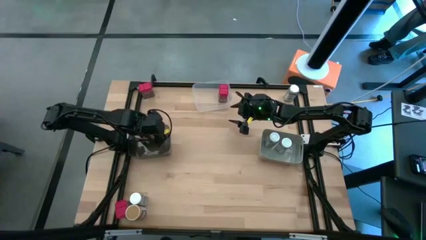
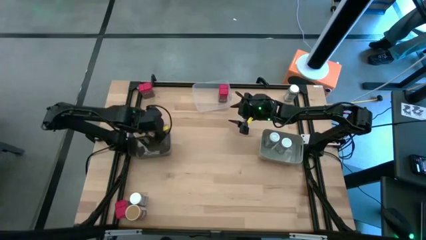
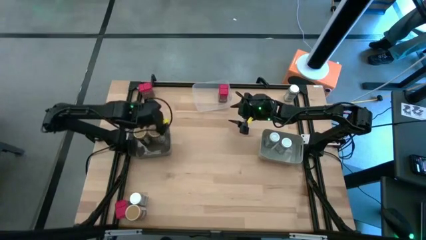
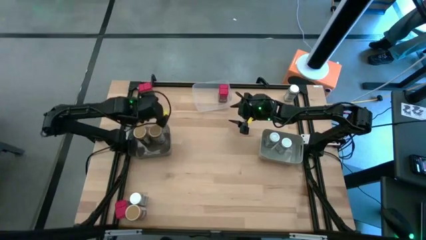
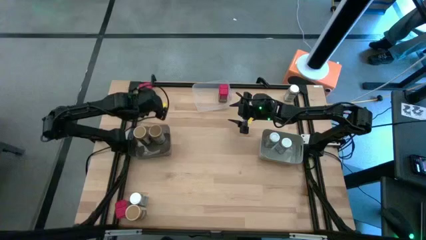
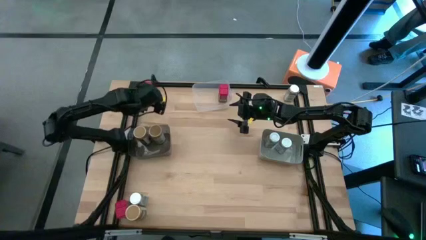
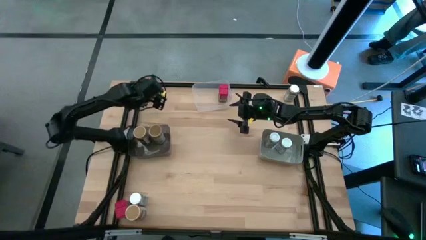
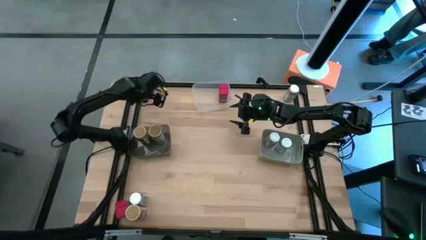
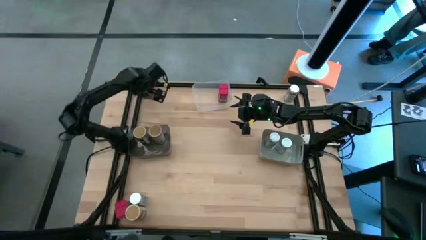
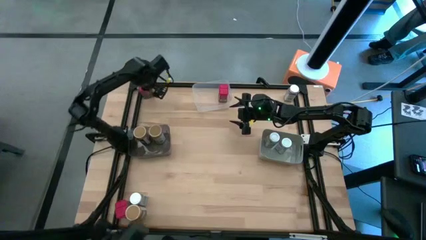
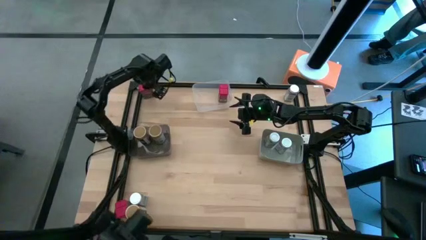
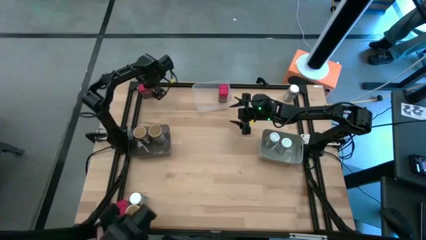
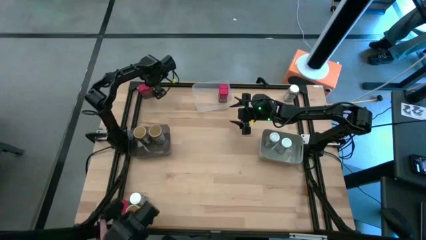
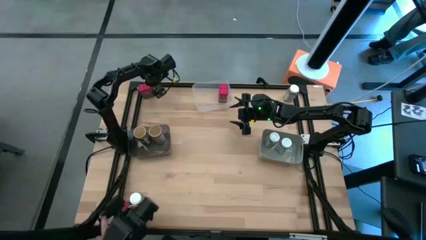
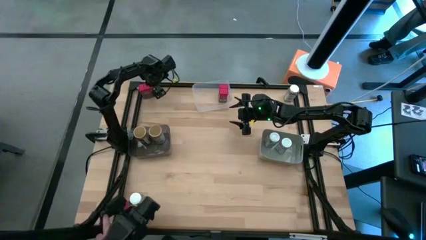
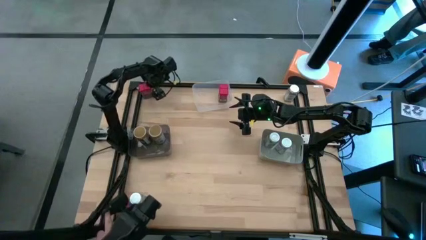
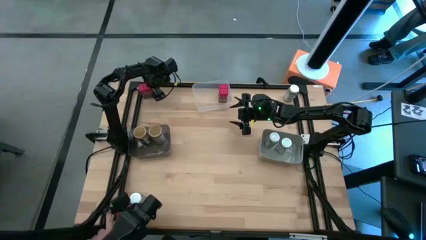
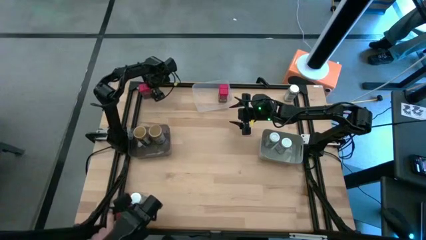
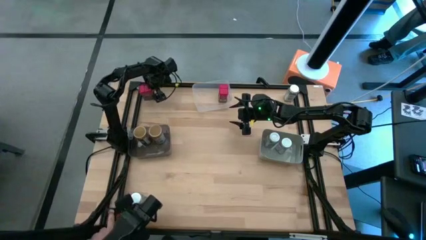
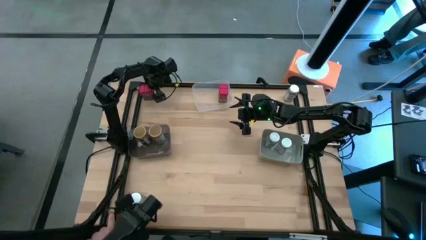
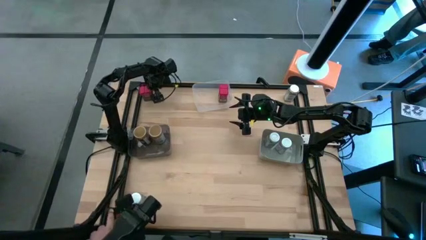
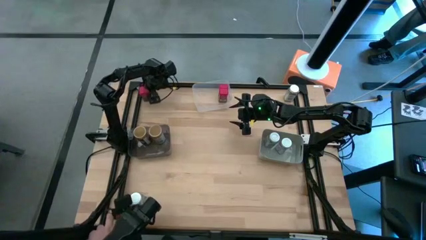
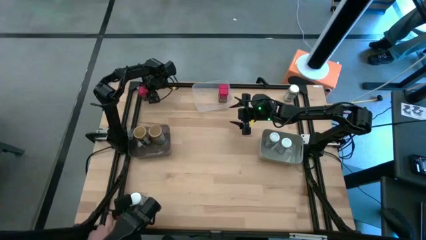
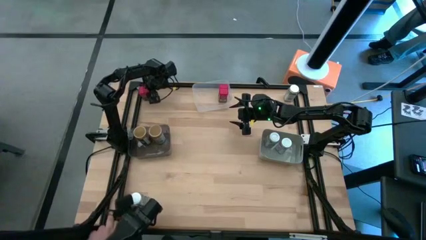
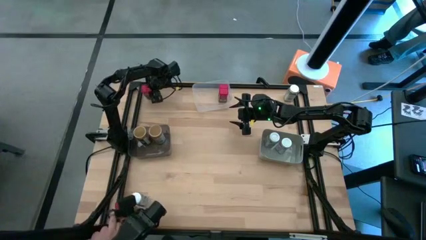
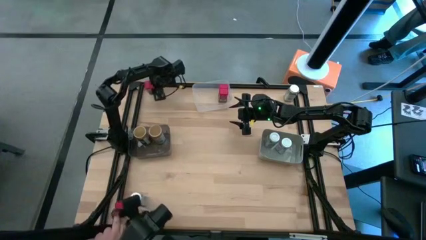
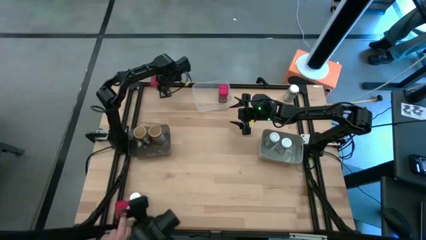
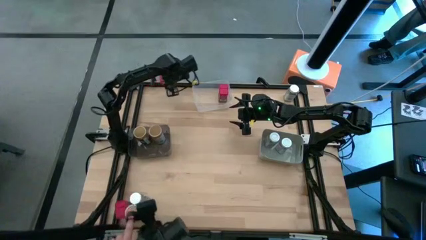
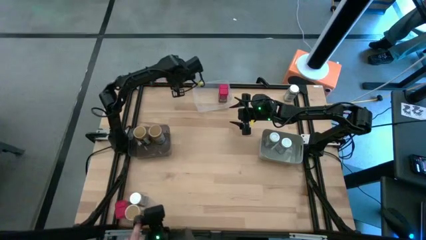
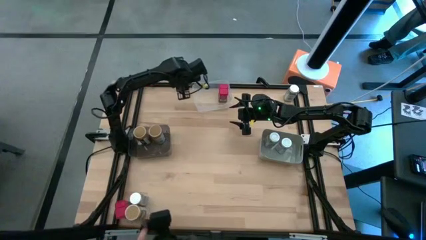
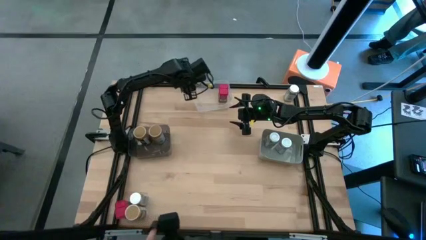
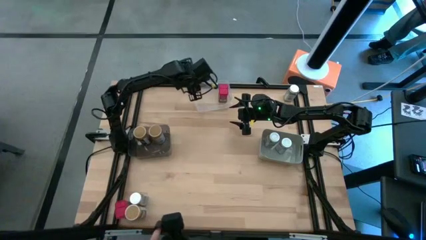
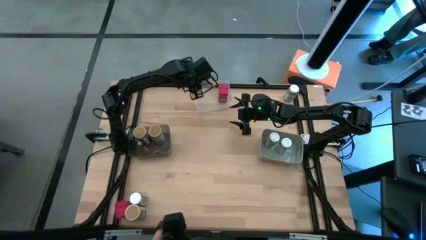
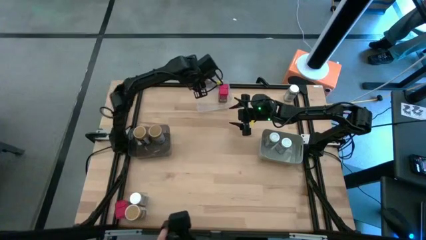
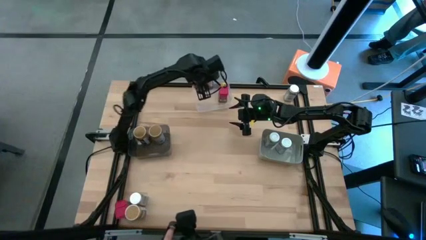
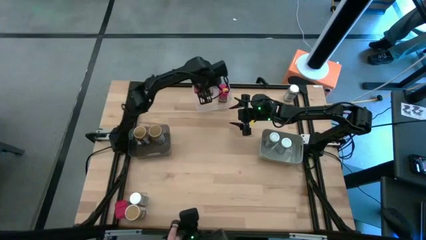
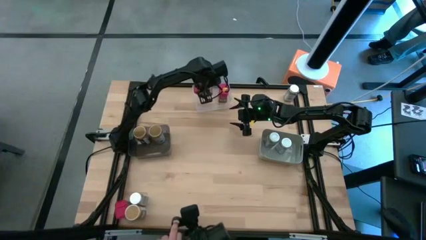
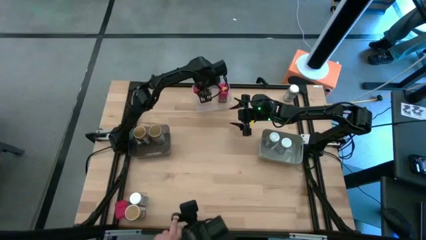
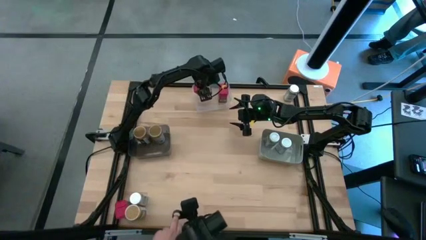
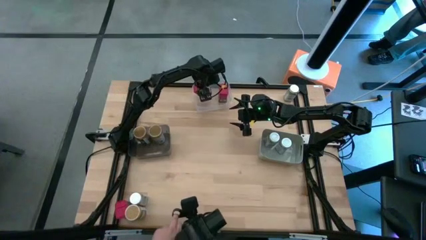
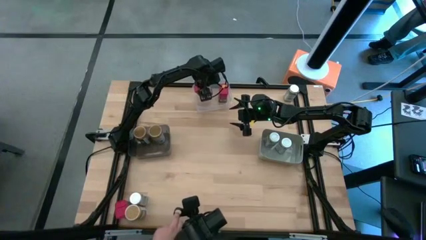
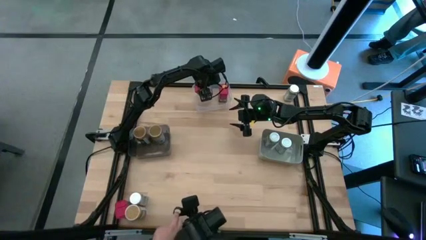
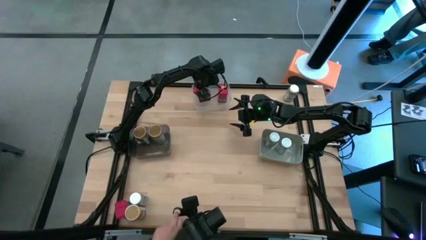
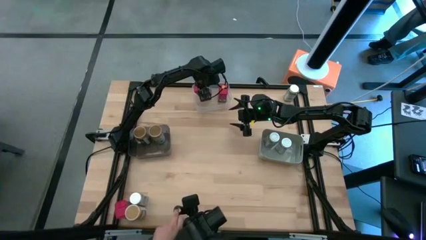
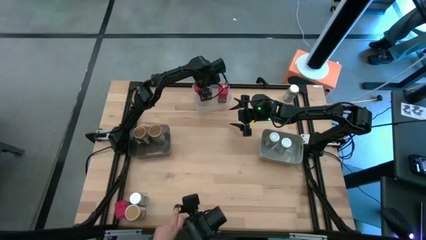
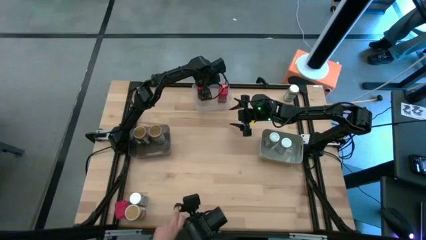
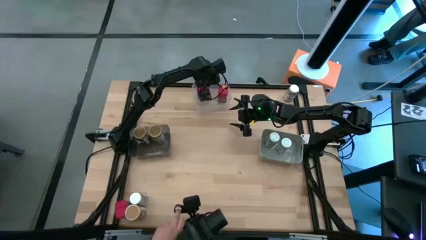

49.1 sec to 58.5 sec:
Task: Sort spices by type
Put the top red spice bottle into the transparent bin

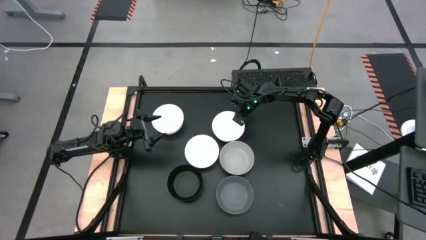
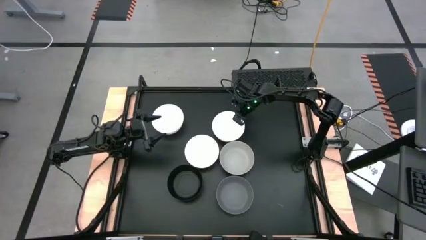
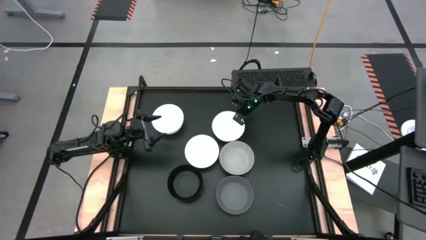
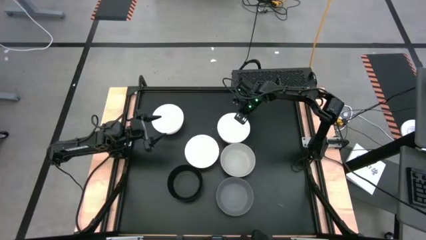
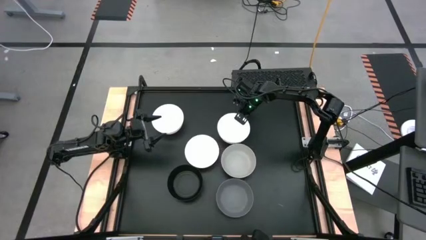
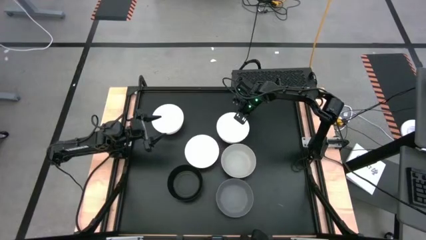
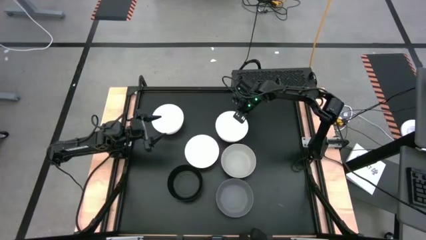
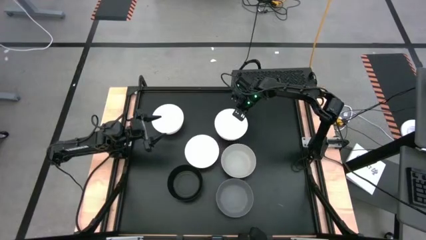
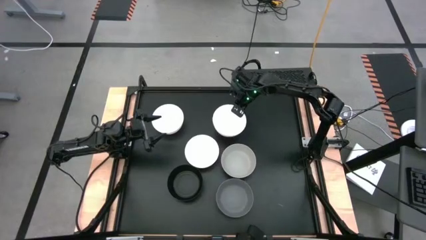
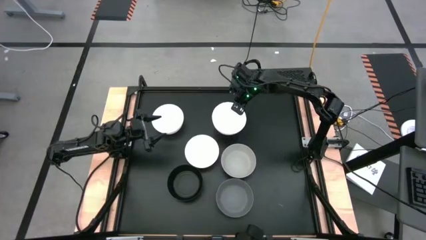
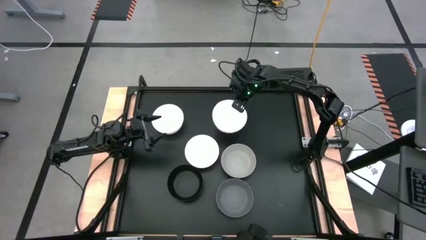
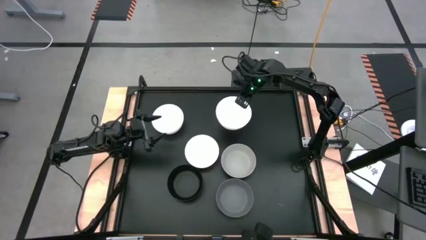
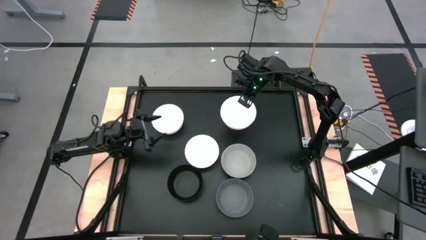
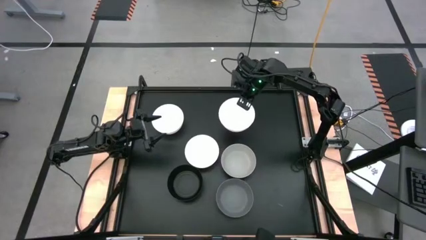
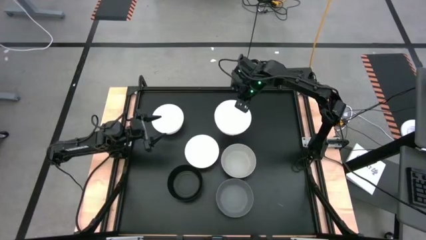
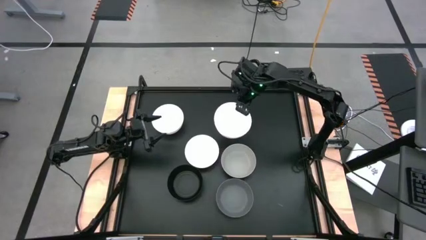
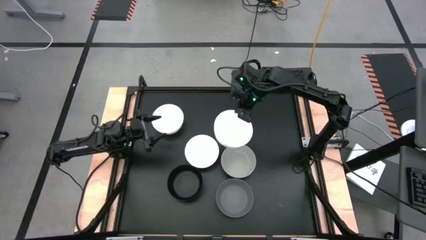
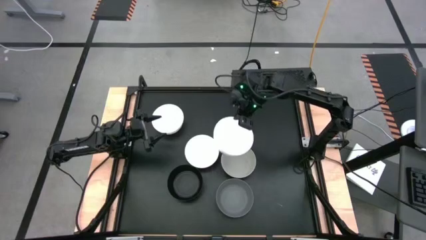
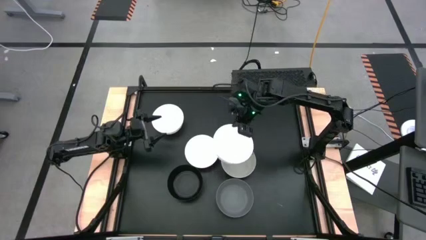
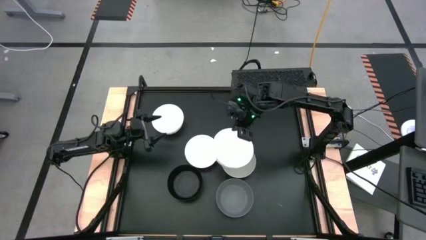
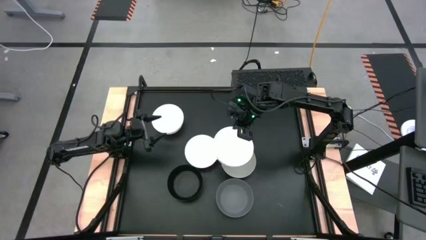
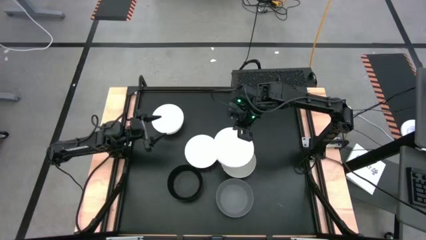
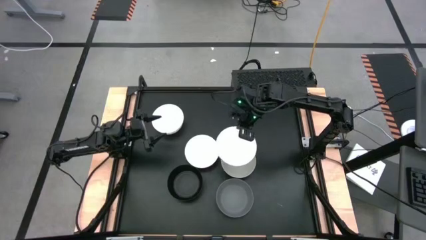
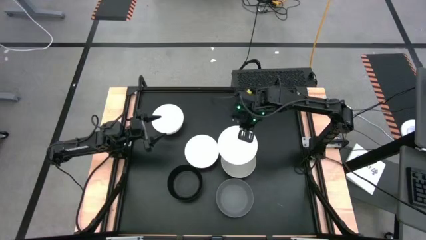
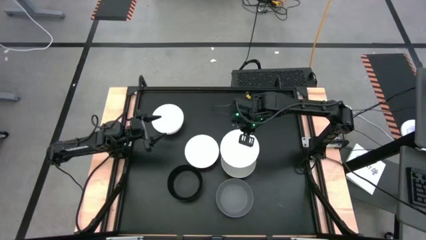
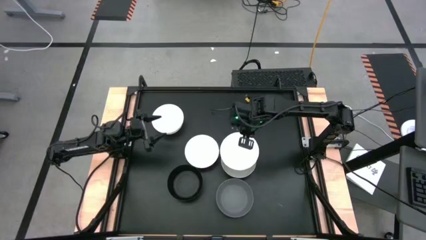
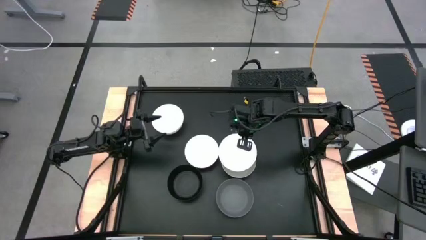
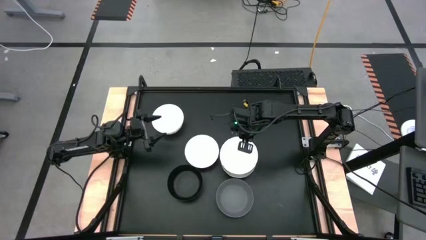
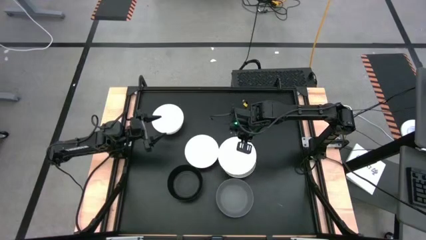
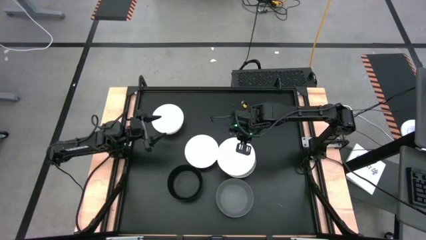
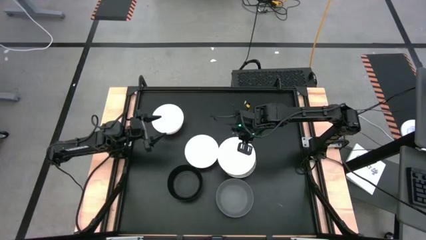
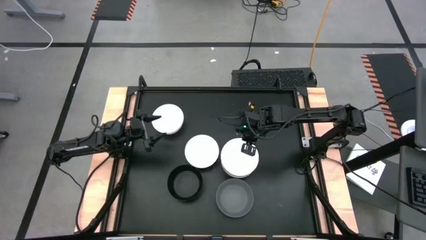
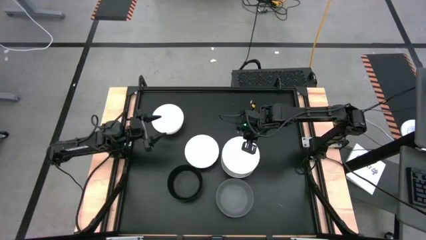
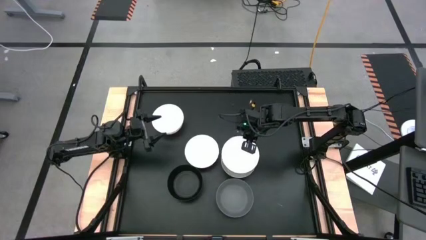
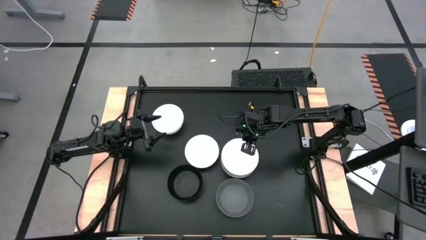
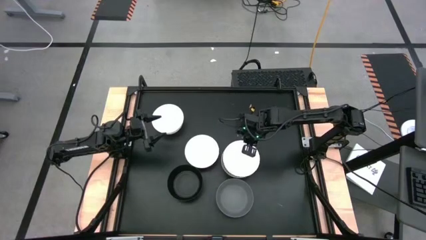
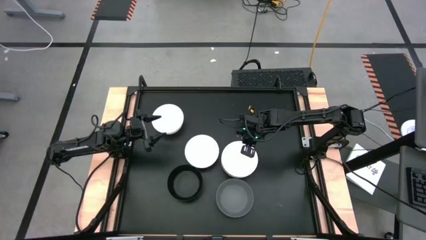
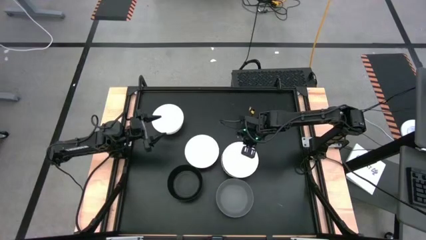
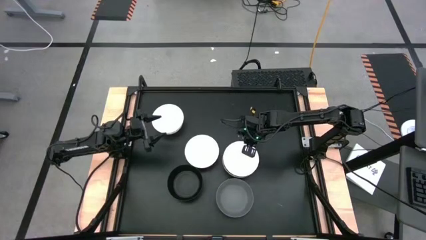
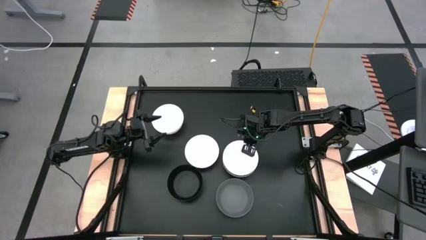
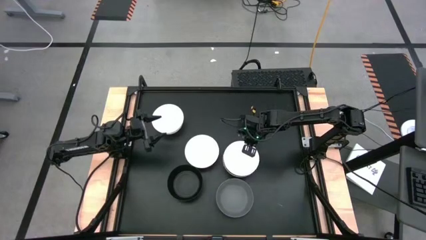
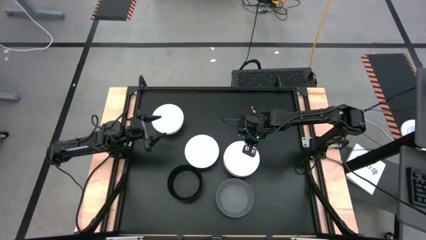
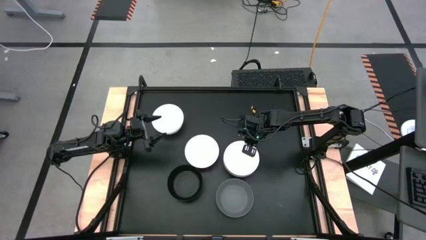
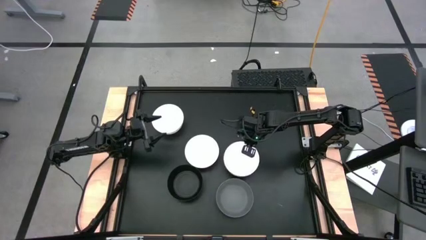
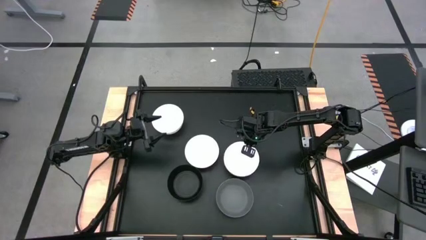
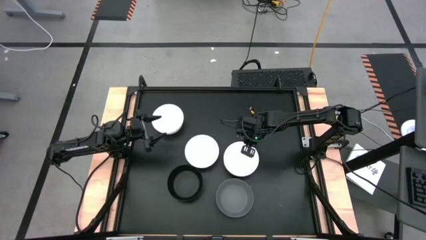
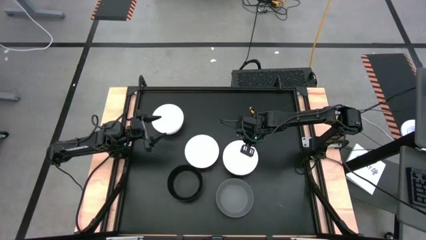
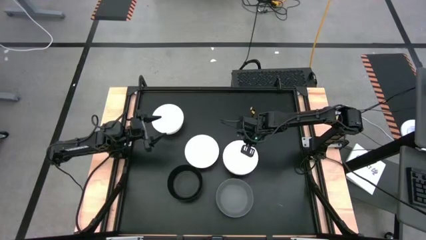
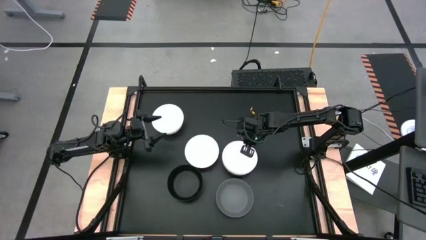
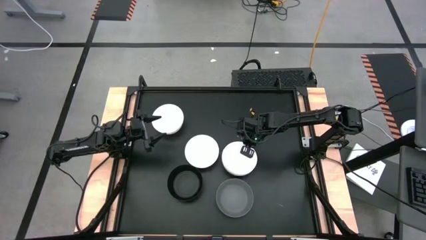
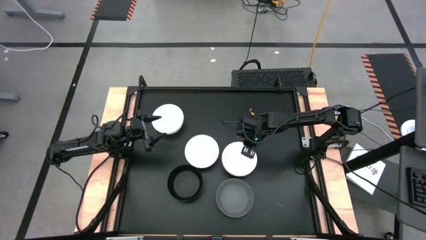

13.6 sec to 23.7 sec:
Task: Nest bowls inside each other
Stack the top right white bowl into the gray bowl
